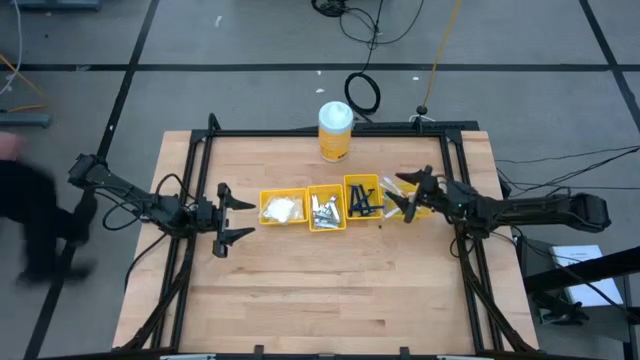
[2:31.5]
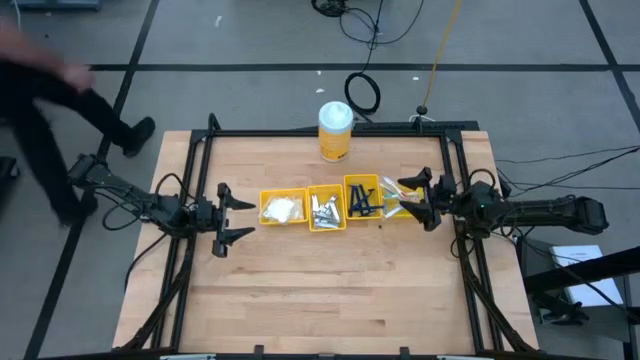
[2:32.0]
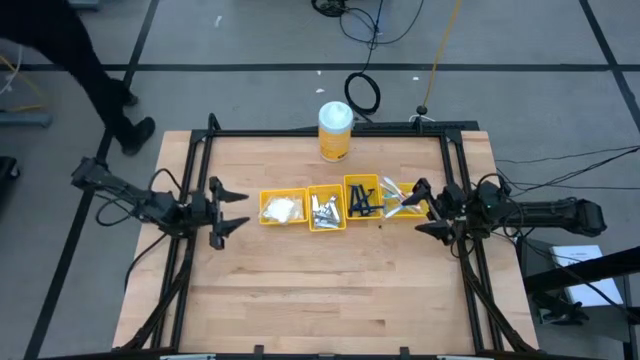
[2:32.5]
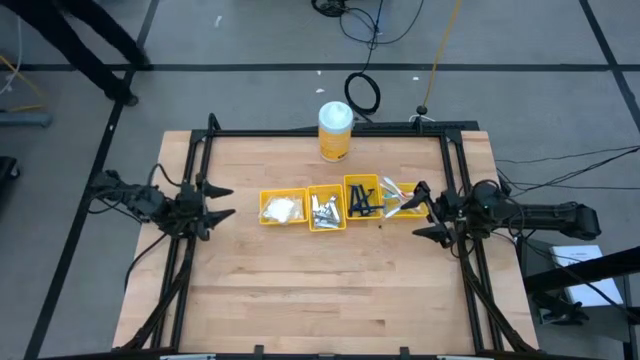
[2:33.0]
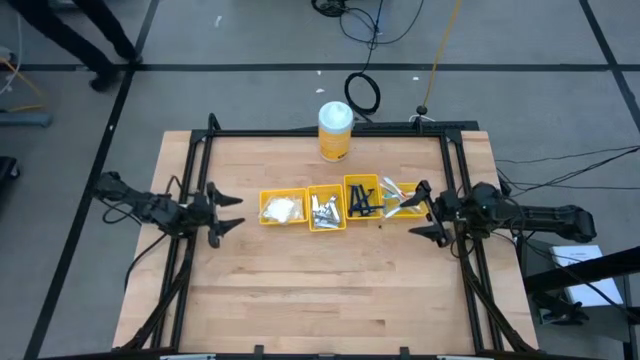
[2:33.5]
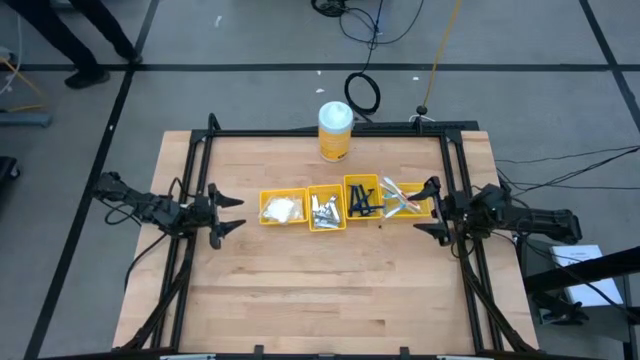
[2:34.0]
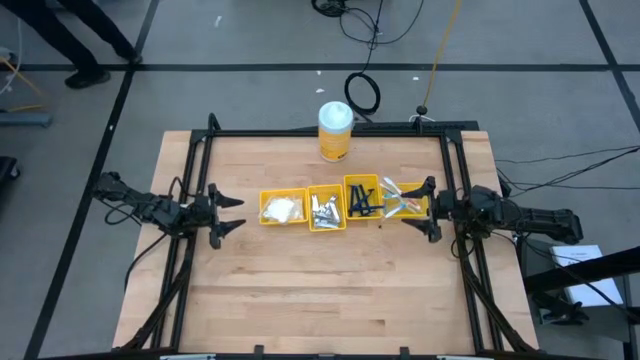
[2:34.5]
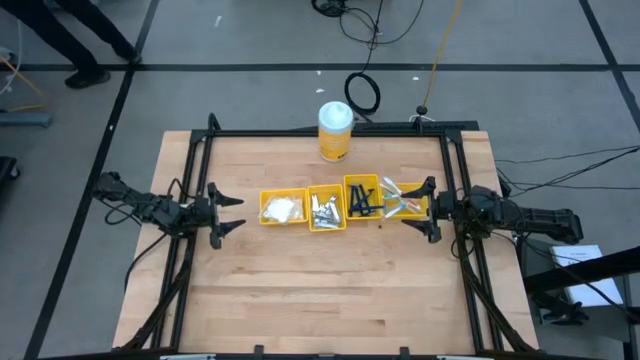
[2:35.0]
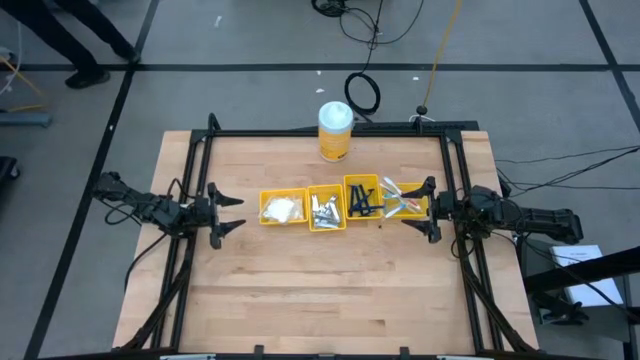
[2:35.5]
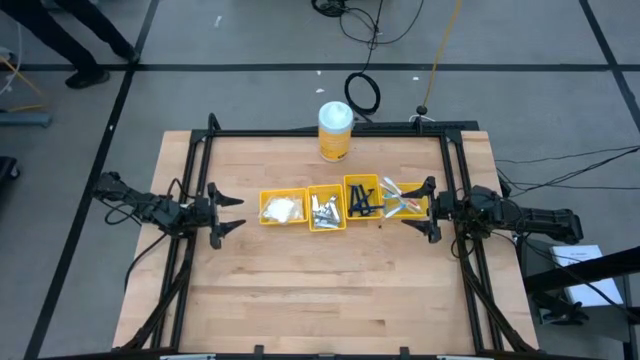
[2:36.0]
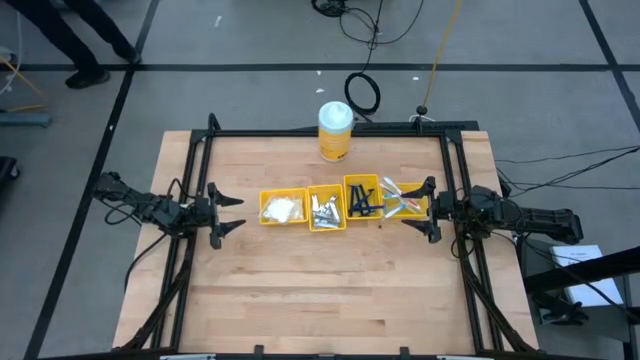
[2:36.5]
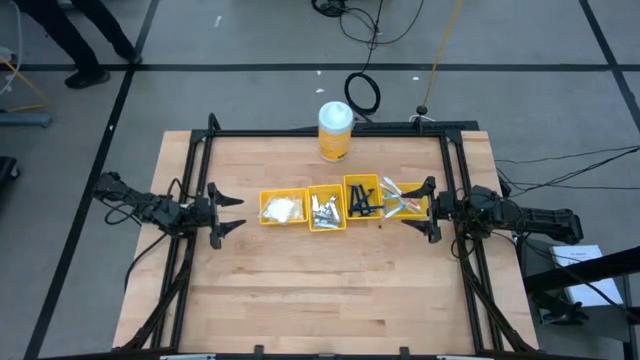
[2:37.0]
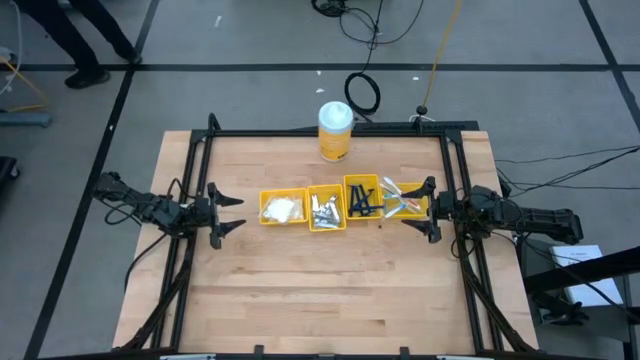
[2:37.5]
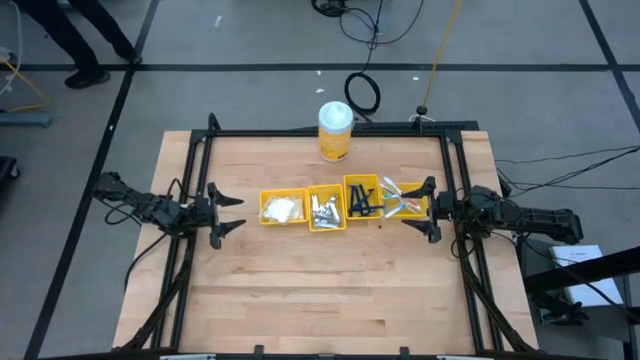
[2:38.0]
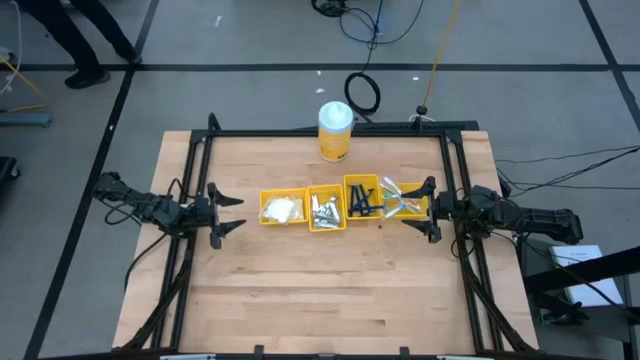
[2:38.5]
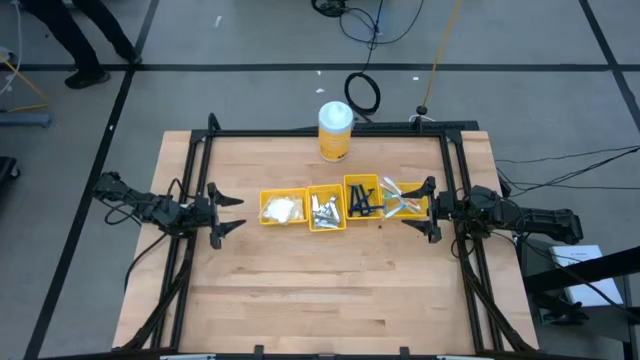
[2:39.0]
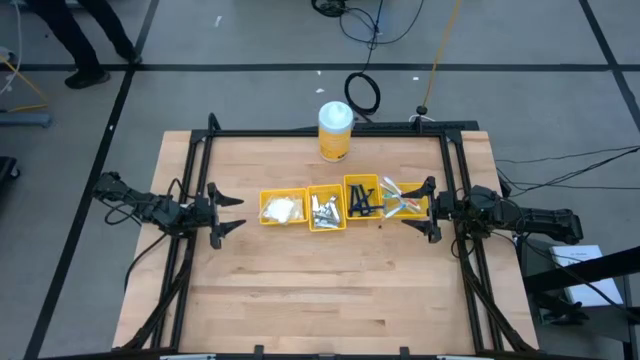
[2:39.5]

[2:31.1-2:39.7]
Task: Pick & Place Travel size toiletries
Return to Home Position

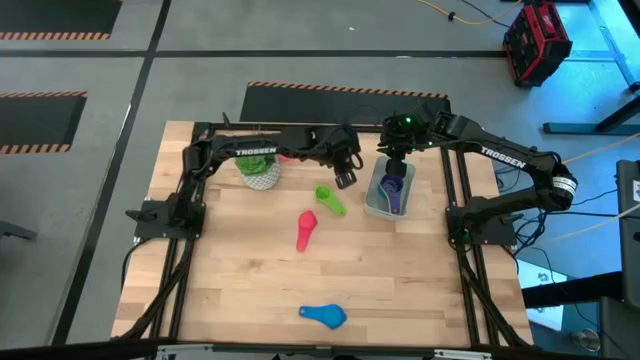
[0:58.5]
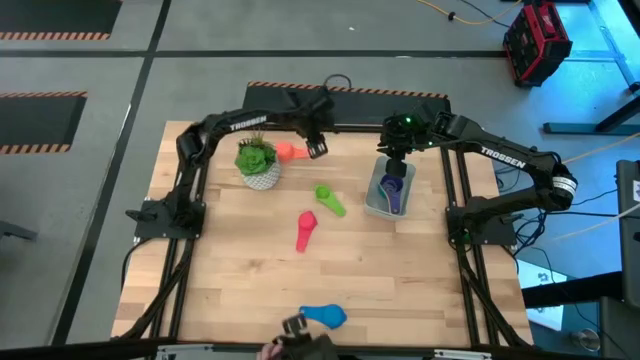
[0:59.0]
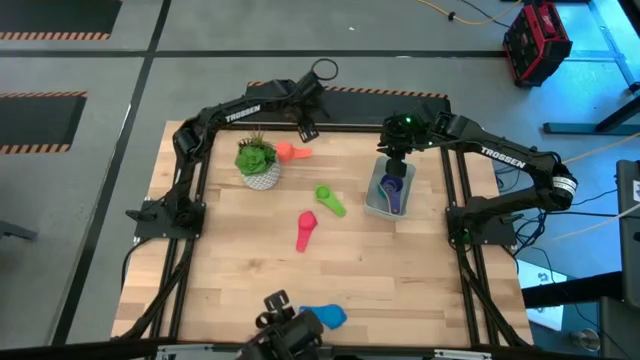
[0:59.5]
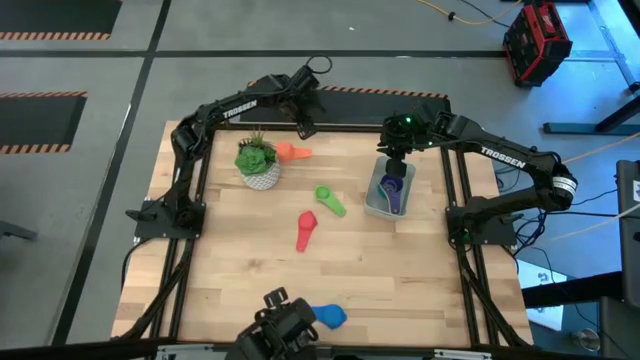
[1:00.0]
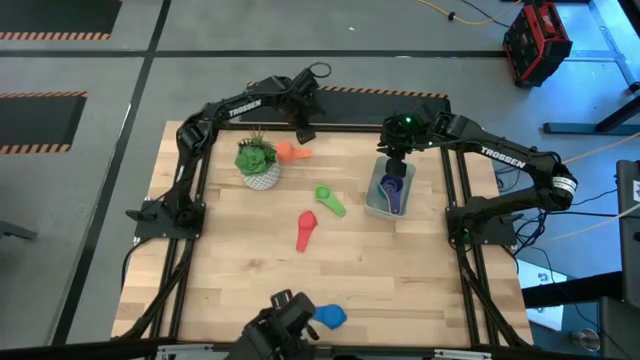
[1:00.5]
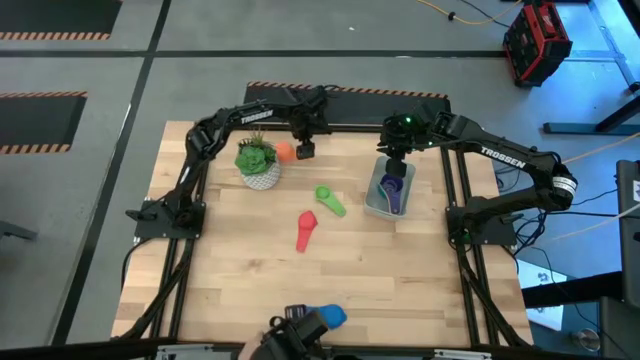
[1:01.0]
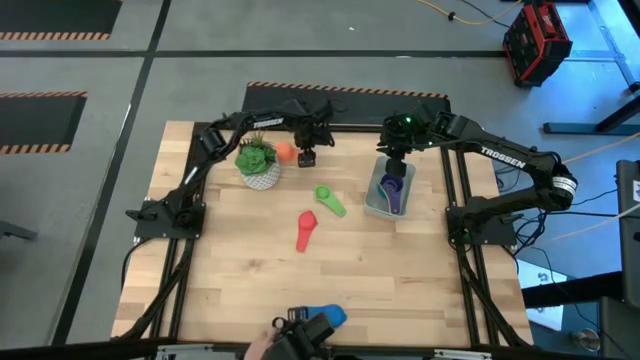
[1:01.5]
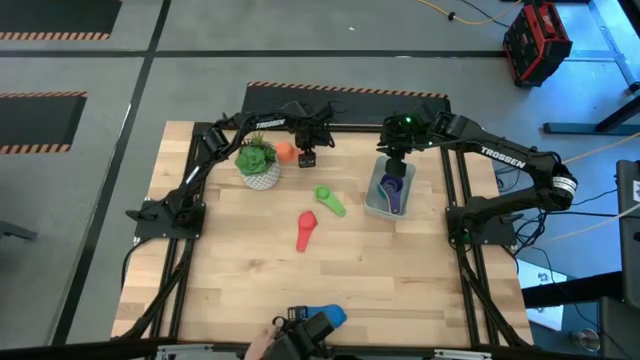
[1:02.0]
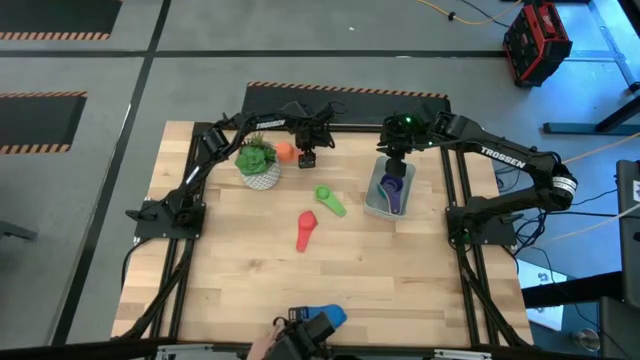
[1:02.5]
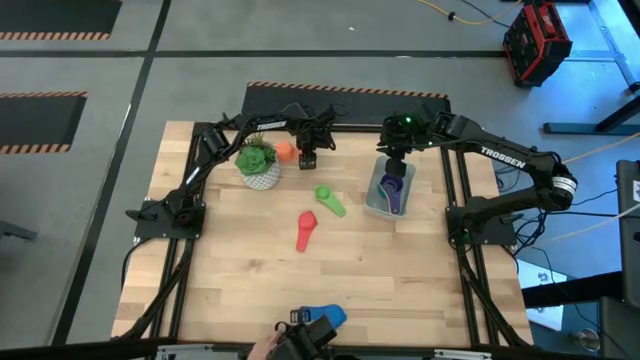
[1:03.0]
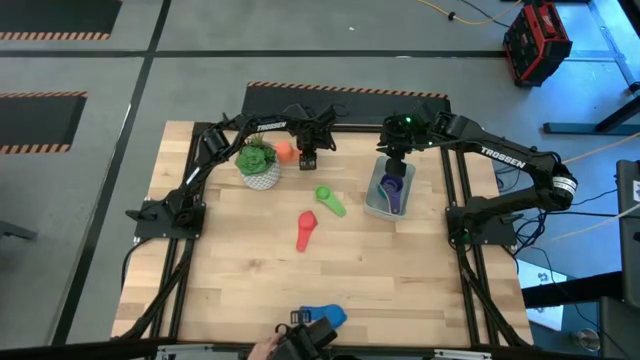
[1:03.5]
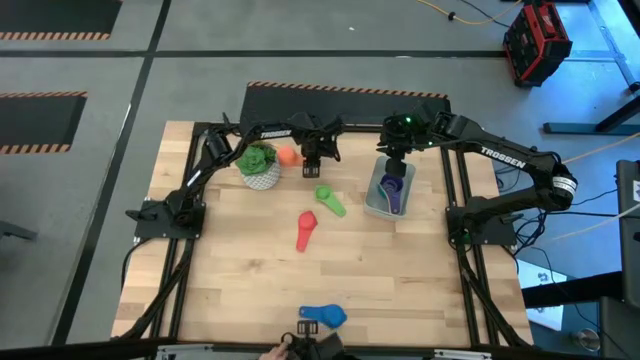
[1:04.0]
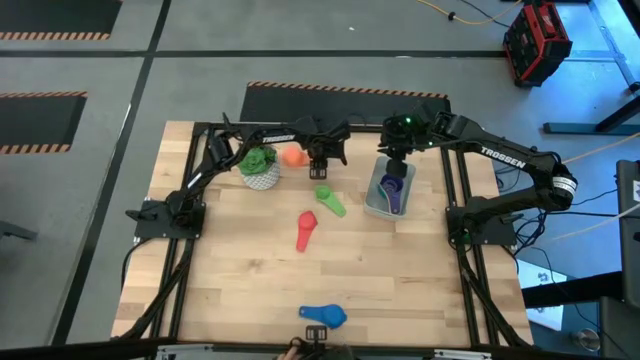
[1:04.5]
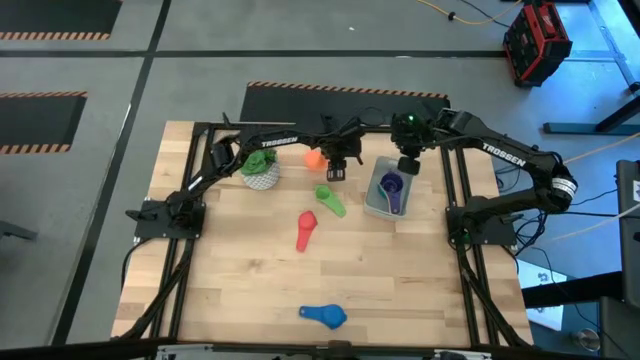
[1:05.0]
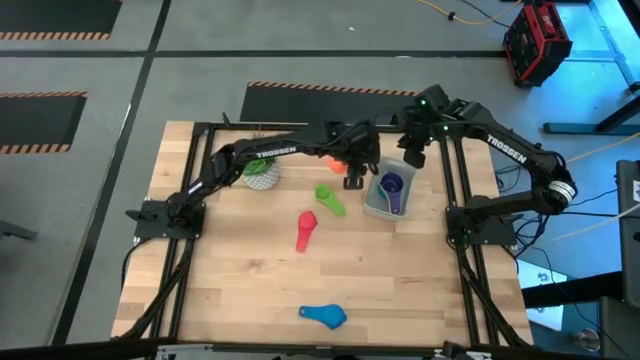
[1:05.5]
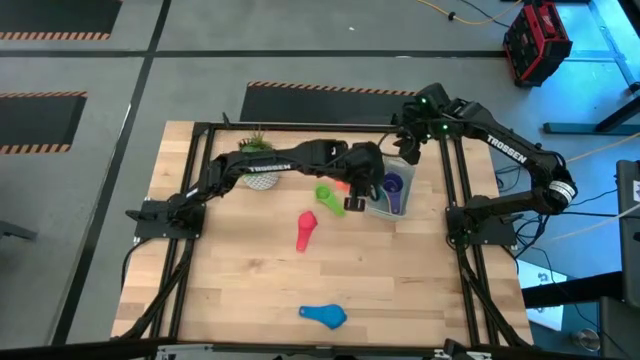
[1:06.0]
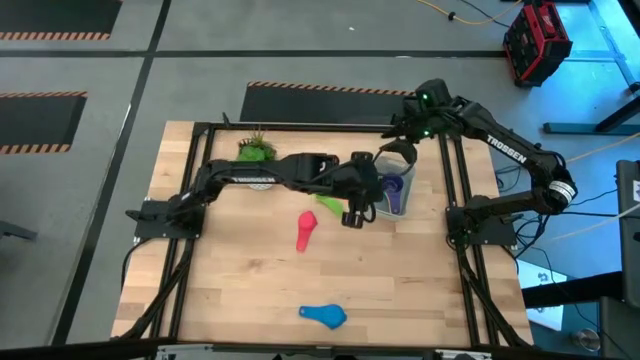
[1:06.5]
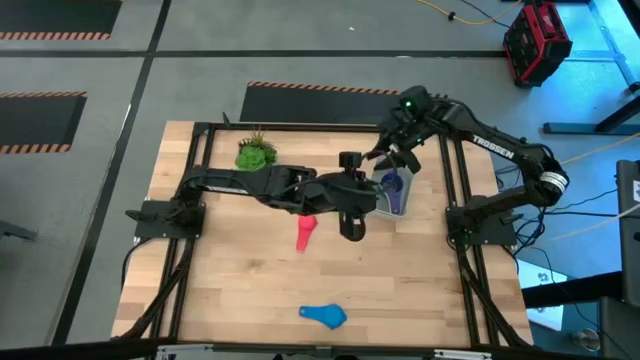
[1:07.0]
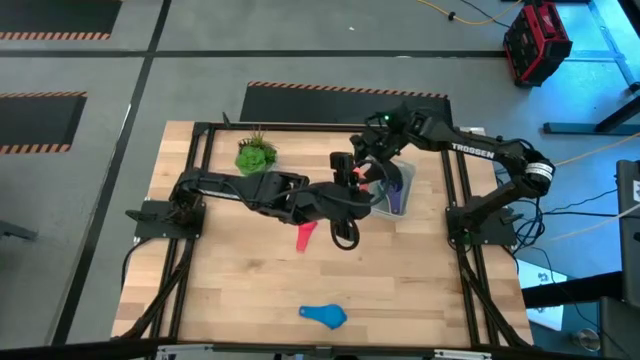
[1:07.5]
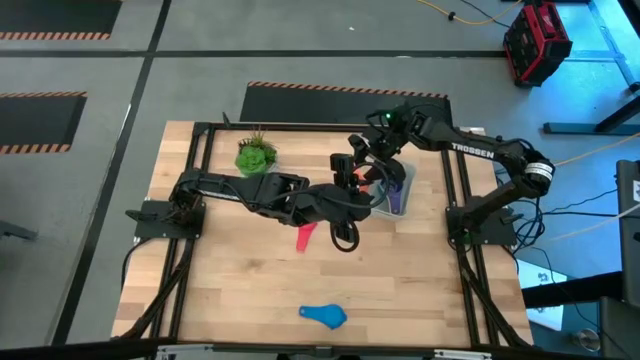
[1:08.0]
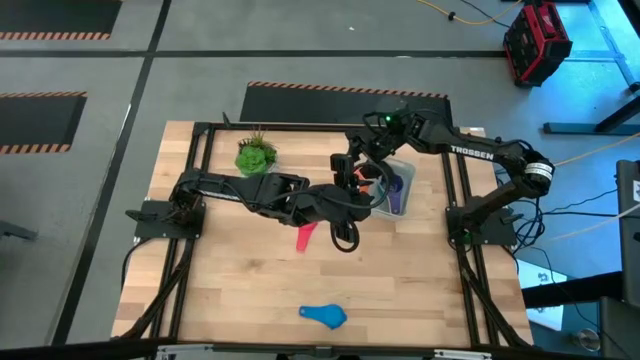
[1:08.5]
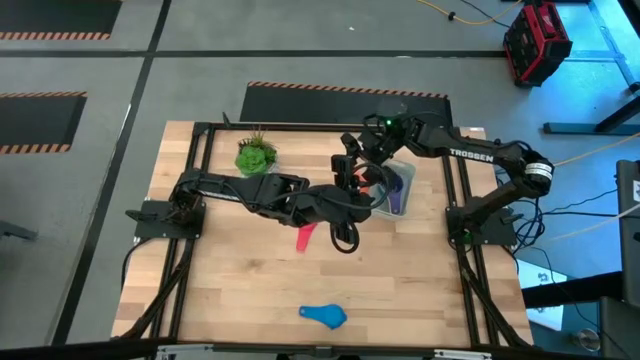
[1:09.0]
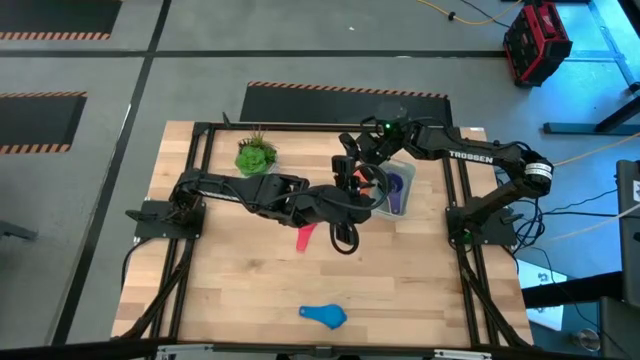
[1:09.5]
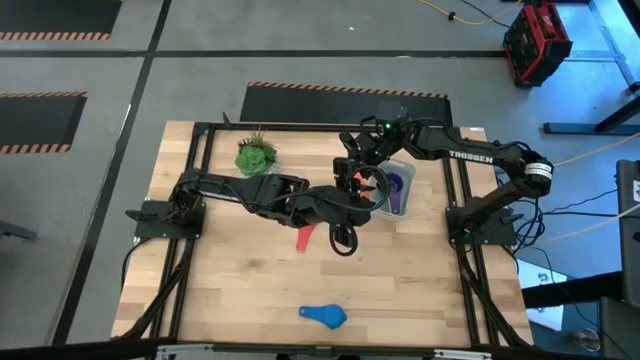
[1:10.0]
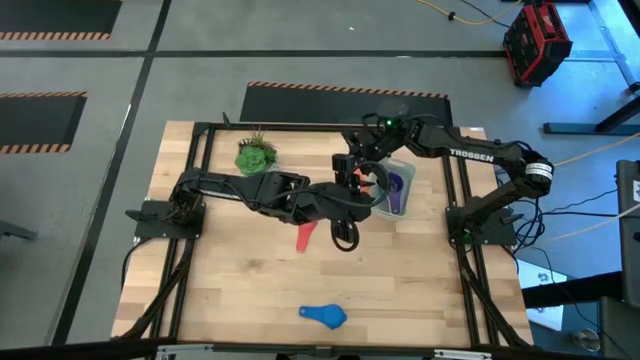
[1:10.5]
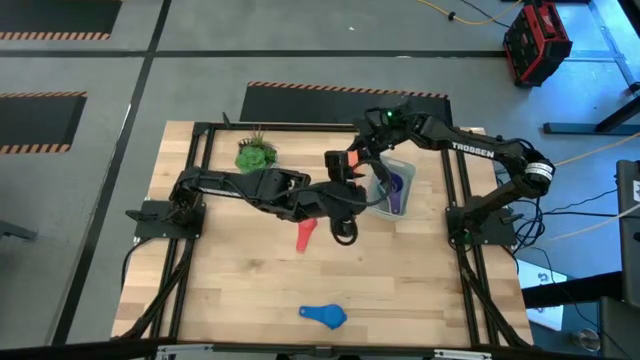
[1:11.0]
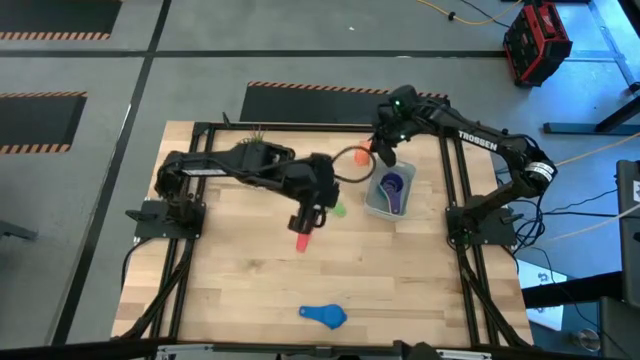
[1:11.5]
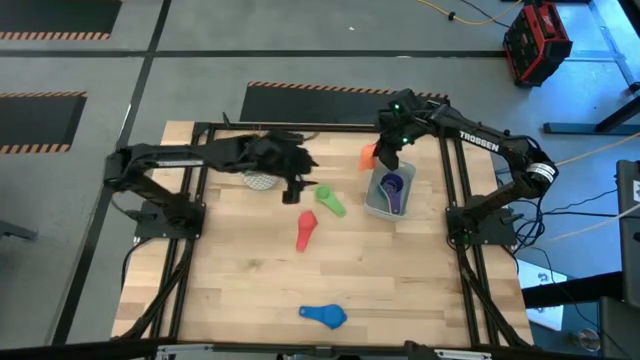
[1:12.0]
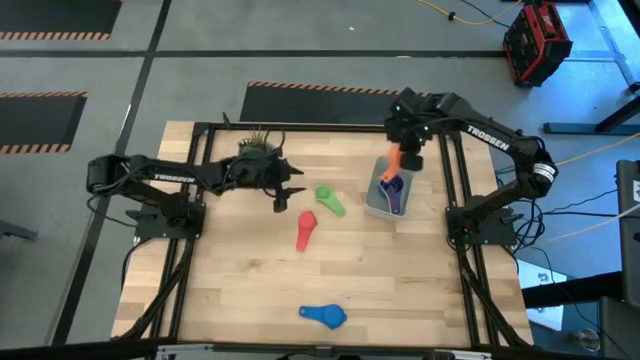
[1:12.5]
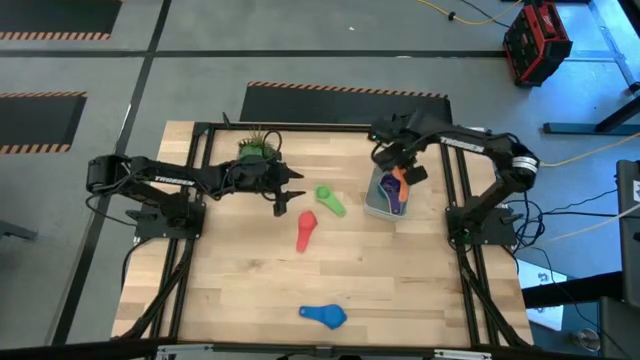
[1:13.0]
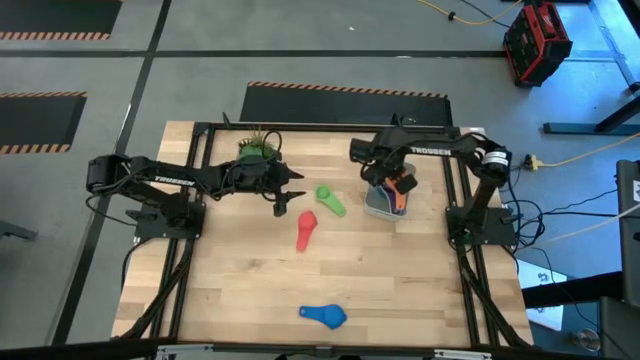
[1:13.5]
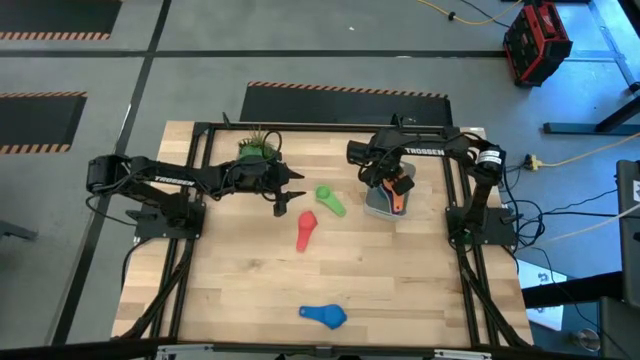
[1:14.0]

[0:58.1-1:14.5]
Task: Nest measuring cups in basket
Stack the orange measuring cup on top of the blue measuring cup in the gray bin
